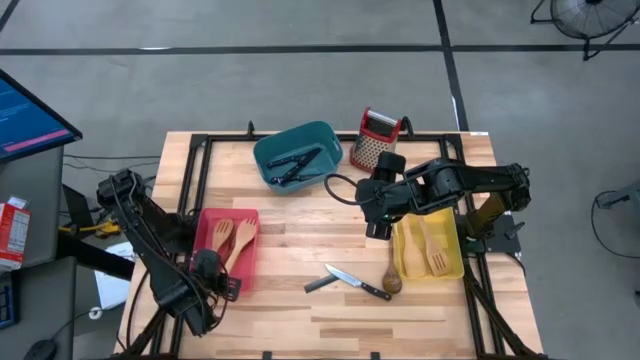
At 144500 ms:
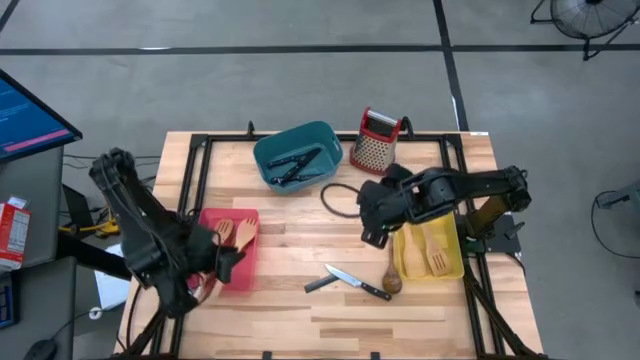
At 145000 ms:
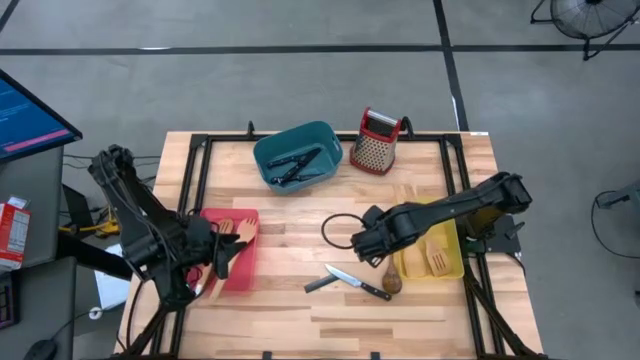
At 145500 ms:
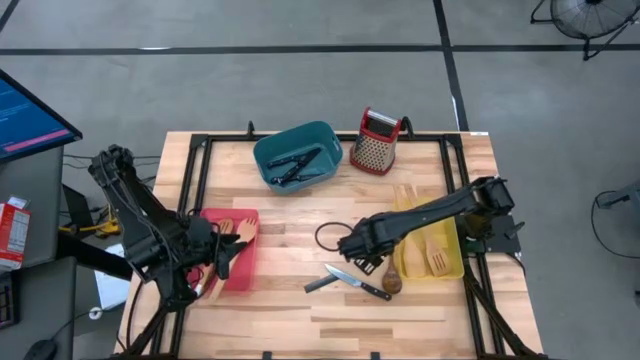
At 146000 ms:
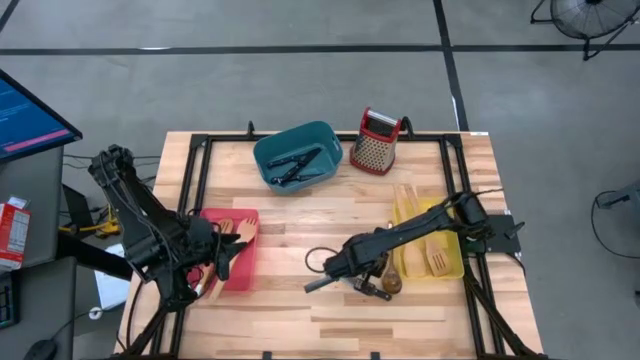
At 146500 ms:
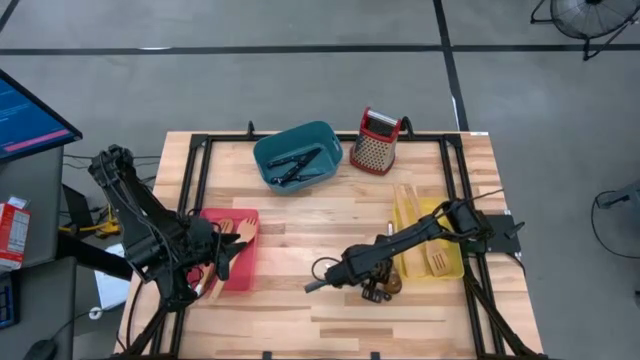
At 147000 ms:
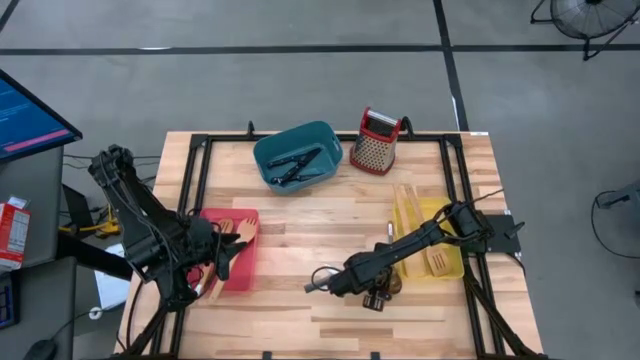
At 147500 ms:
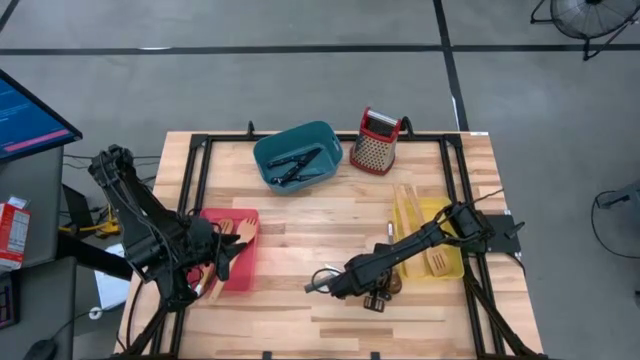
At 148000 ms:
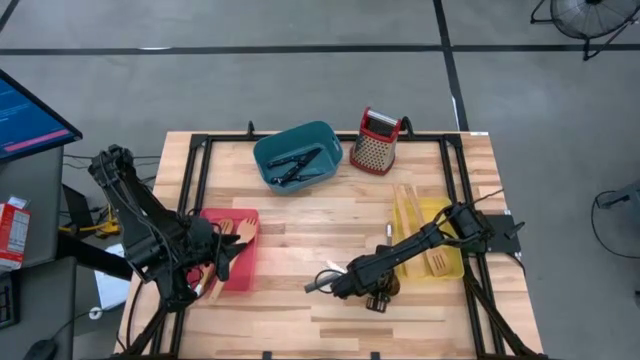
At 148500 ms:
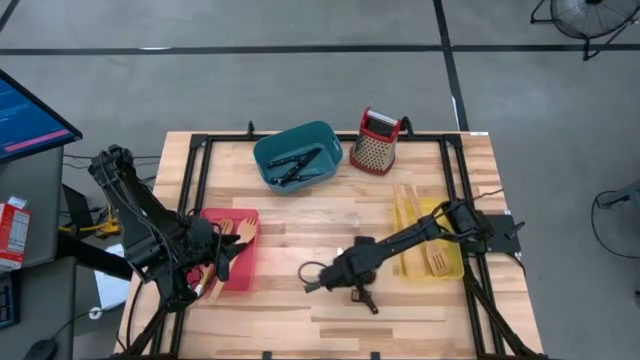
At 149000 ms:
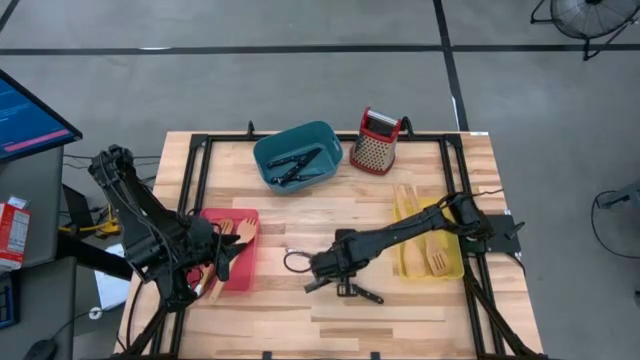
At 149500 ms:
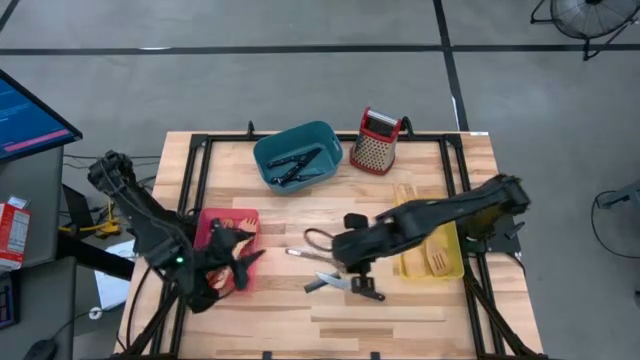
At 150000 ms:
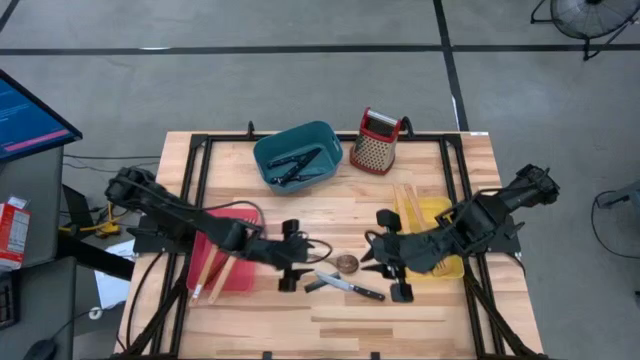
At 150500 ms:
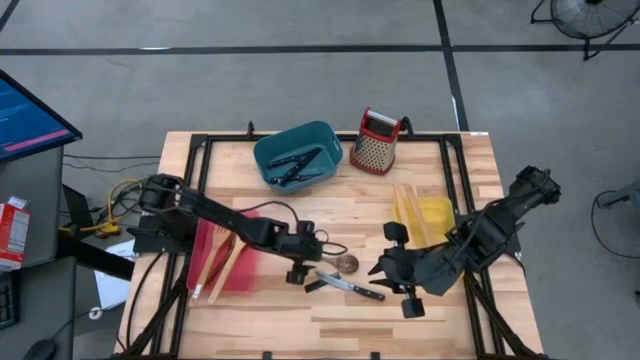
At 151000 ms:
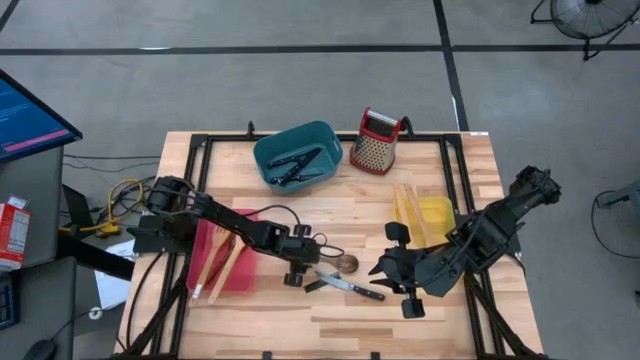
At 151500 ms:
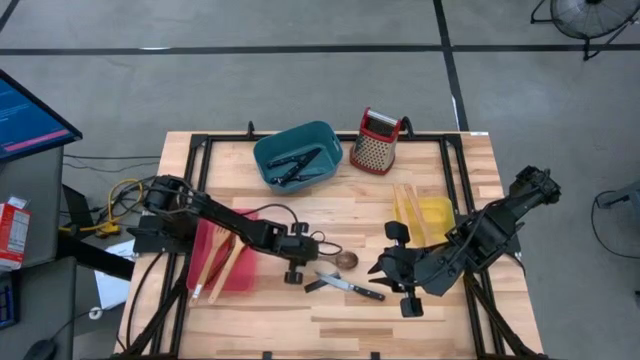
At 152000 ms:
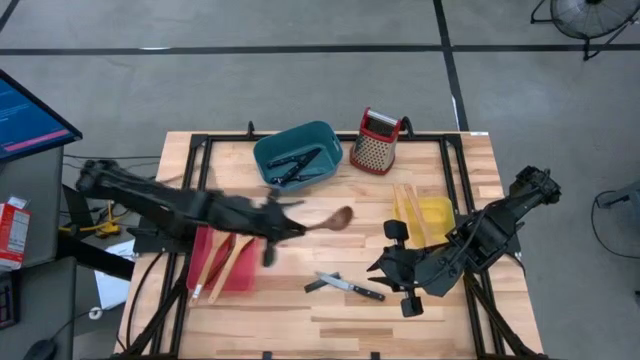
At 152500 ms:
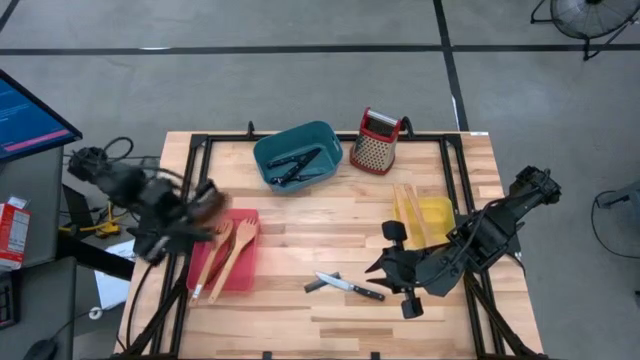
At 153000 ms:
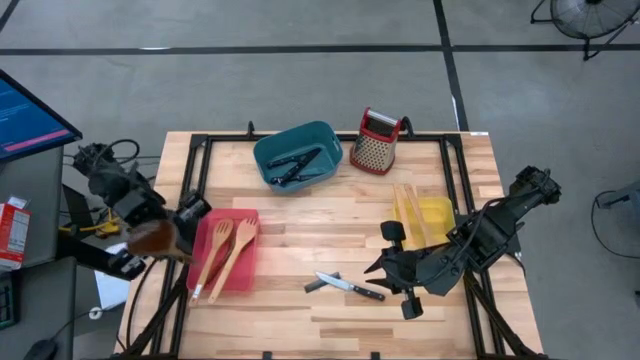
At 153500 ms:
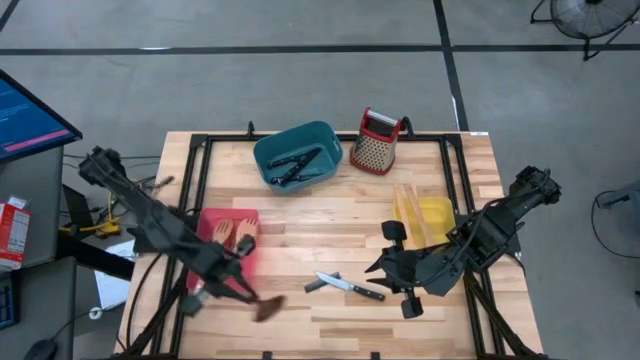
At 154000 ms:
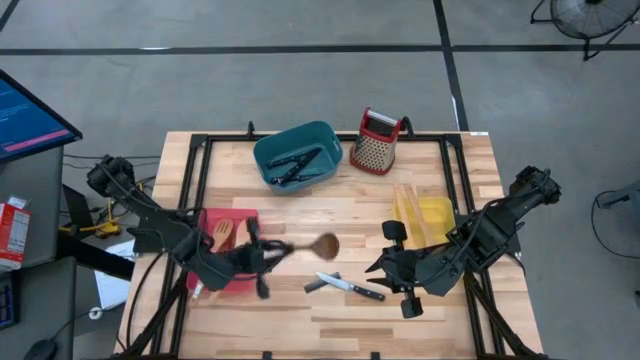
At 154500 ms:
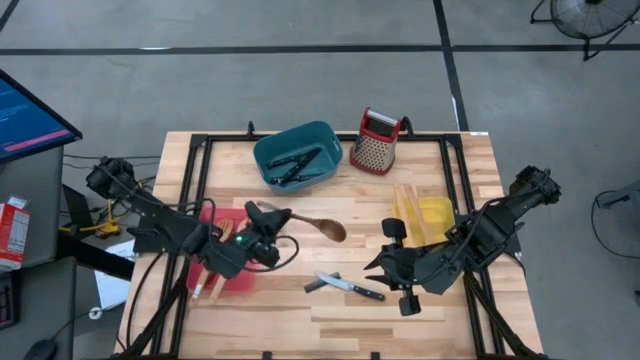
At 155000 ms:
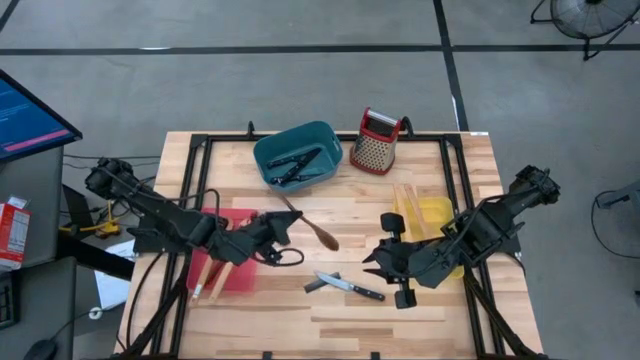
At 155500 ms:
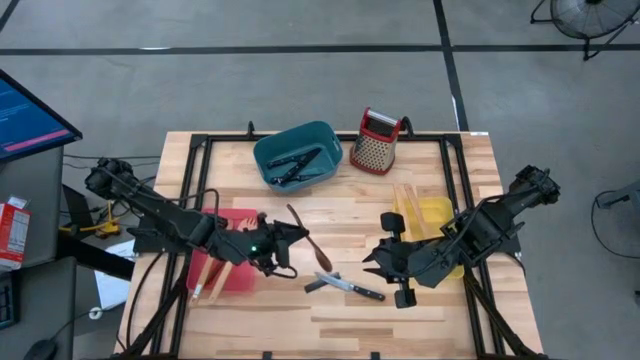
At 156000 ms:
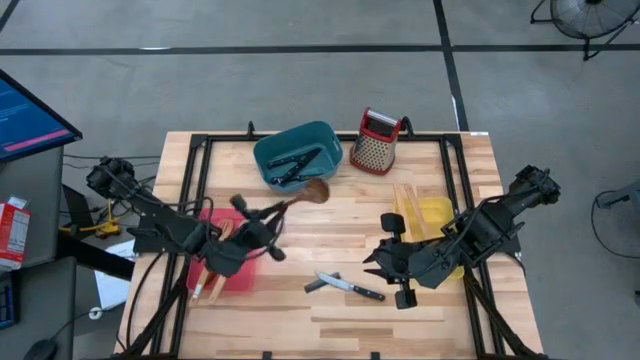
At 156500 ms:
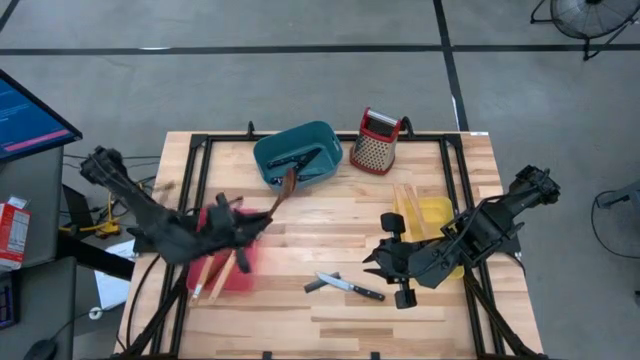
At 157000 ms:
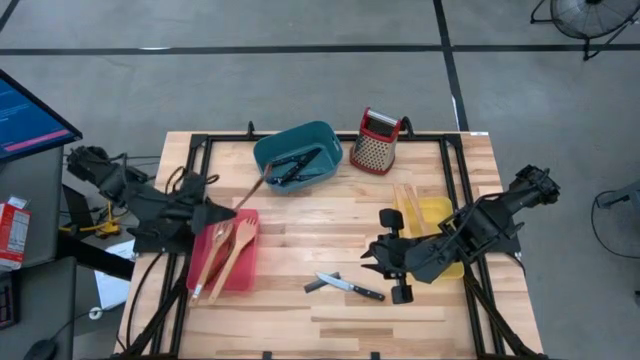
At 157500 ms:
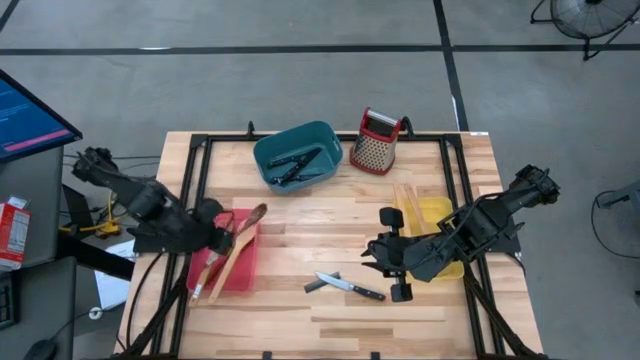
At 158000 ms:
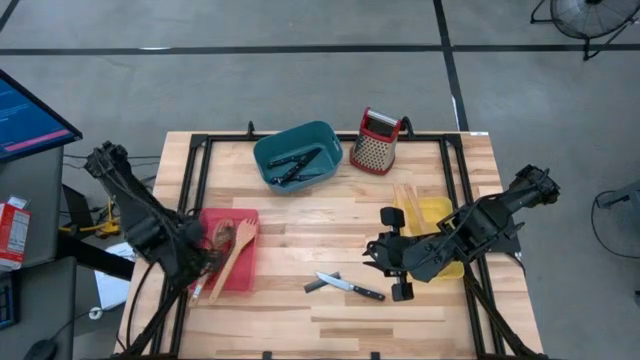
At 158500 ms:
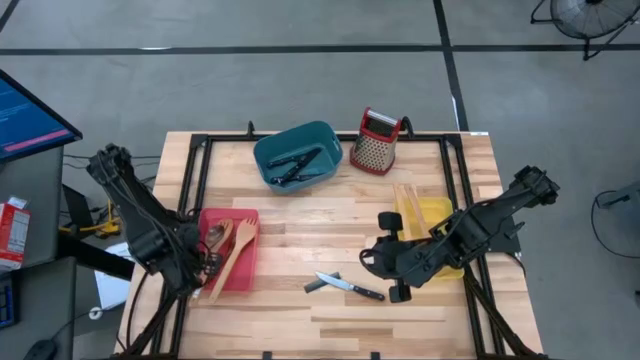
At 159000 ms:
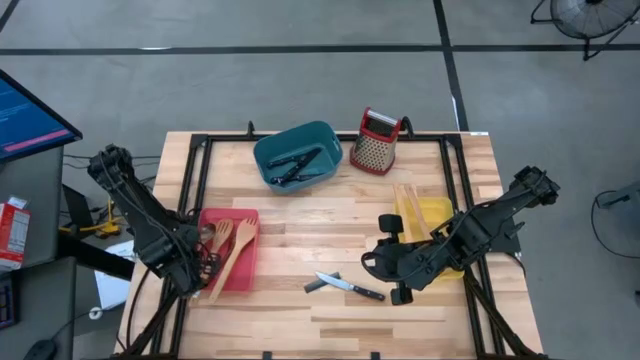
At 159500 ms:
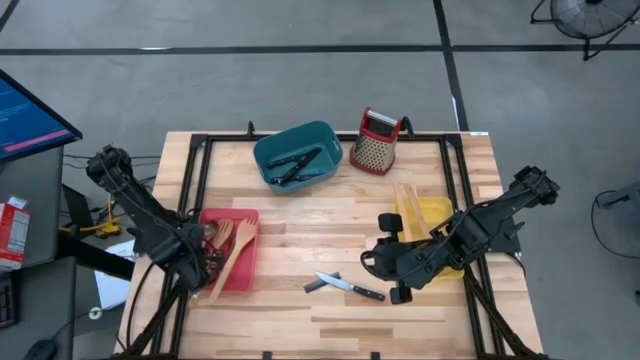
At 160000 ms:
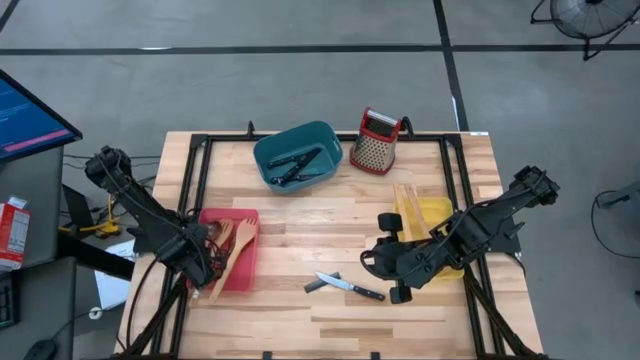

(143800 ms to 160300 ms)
Task: Pick & Place Kitchen Items
Put the dark brown serving spoon into the pink bin
